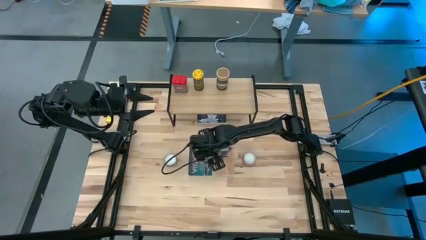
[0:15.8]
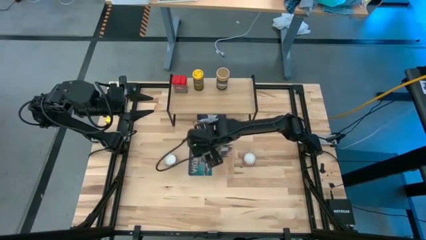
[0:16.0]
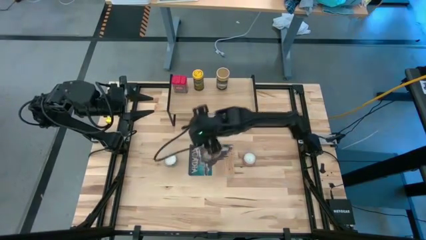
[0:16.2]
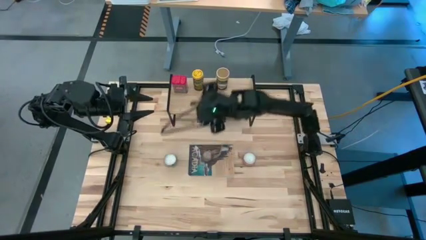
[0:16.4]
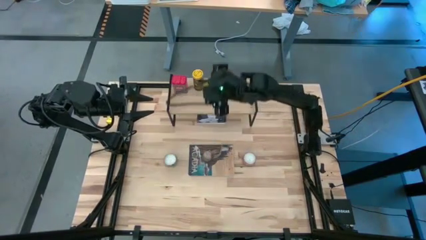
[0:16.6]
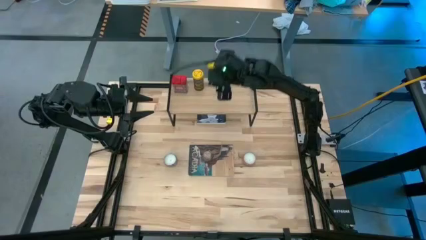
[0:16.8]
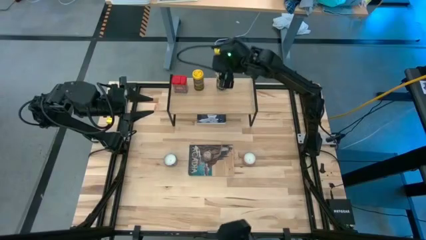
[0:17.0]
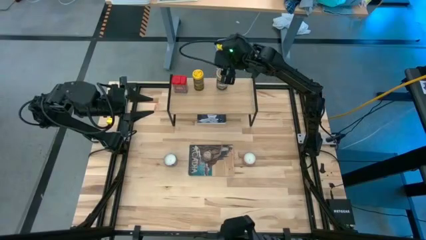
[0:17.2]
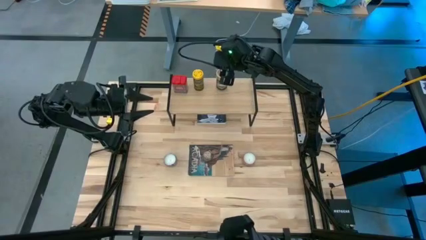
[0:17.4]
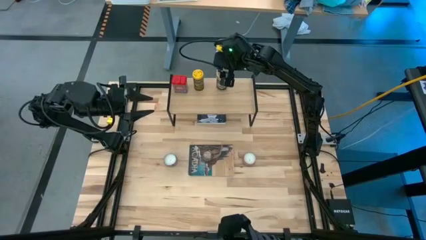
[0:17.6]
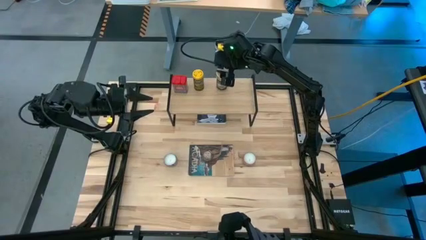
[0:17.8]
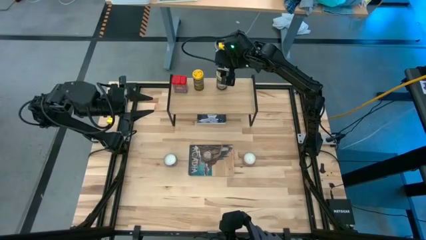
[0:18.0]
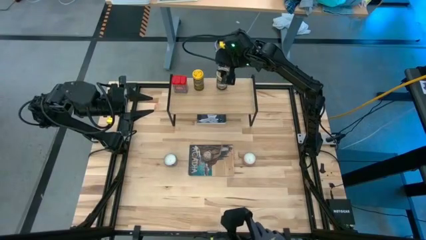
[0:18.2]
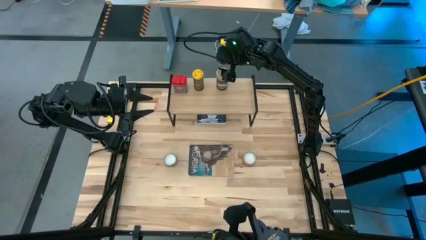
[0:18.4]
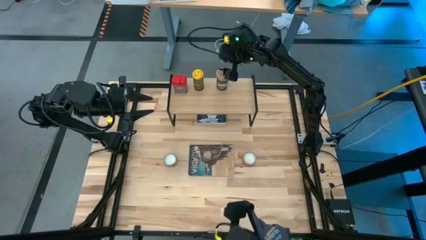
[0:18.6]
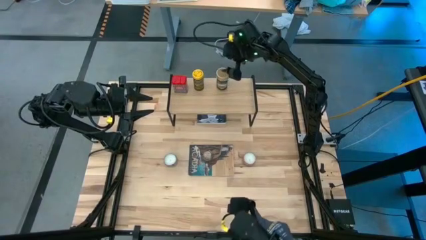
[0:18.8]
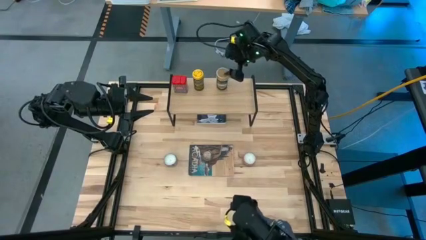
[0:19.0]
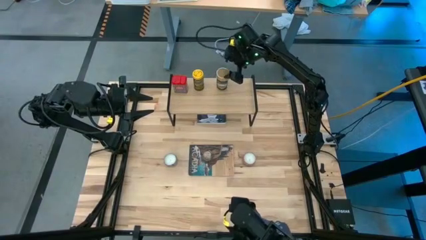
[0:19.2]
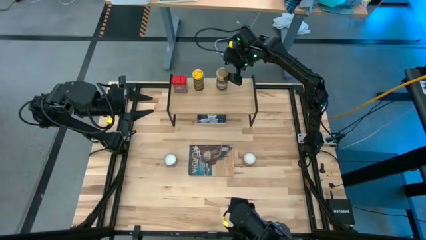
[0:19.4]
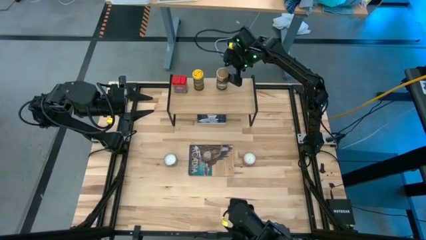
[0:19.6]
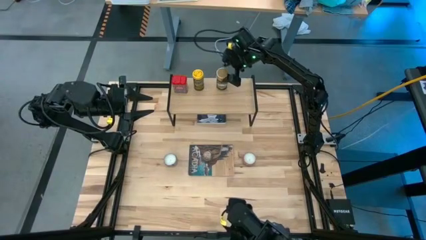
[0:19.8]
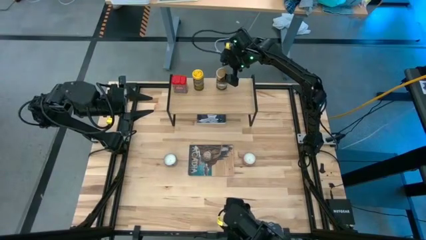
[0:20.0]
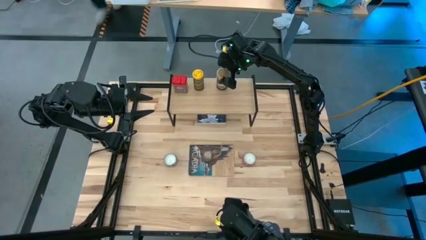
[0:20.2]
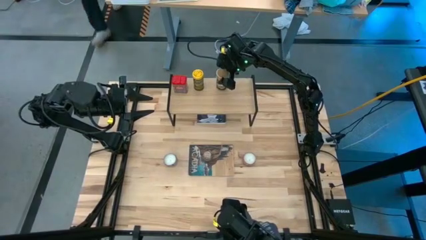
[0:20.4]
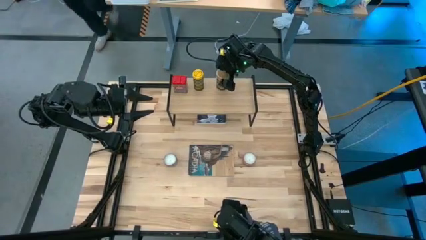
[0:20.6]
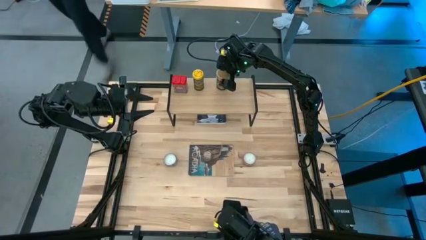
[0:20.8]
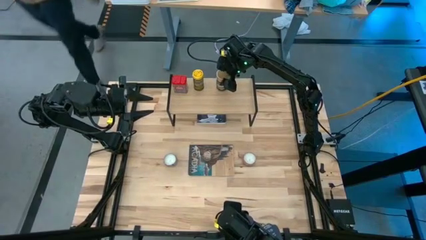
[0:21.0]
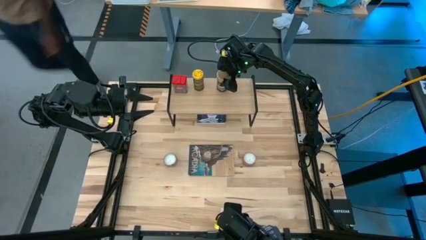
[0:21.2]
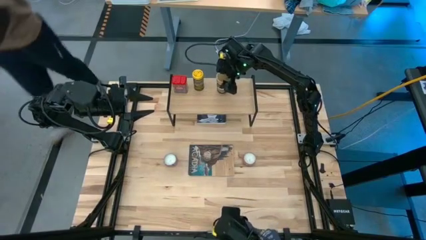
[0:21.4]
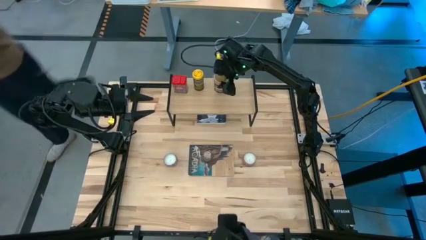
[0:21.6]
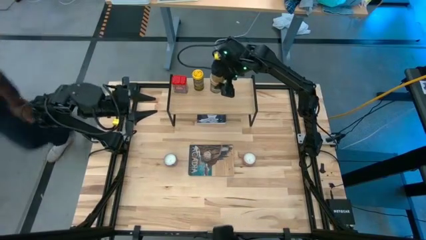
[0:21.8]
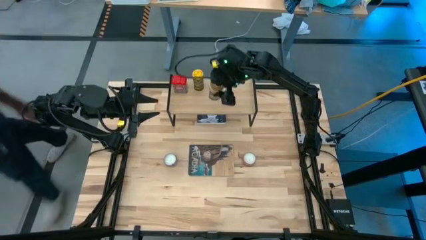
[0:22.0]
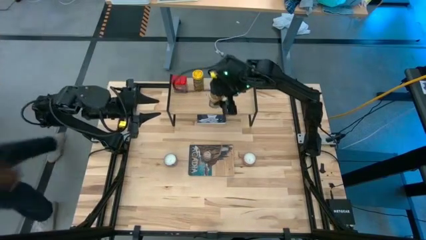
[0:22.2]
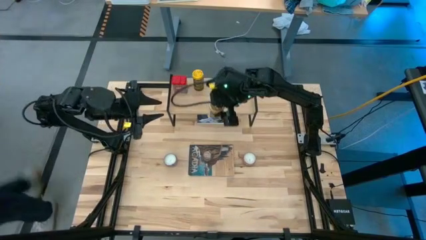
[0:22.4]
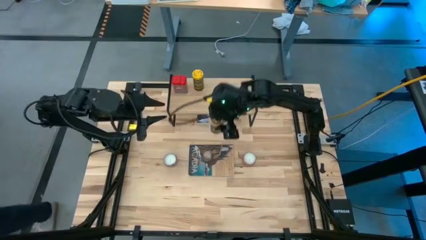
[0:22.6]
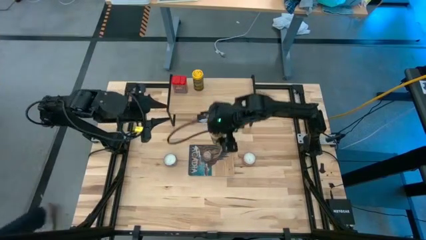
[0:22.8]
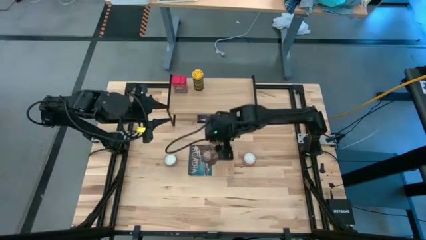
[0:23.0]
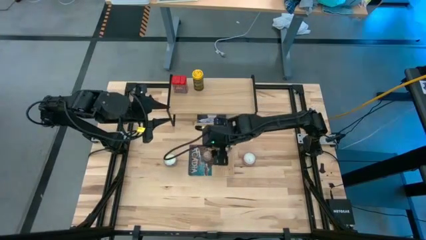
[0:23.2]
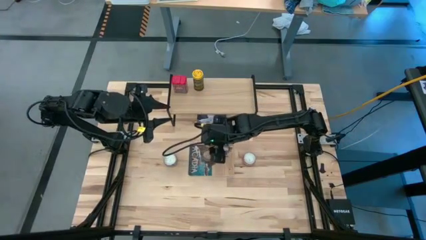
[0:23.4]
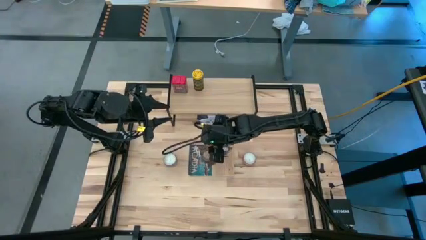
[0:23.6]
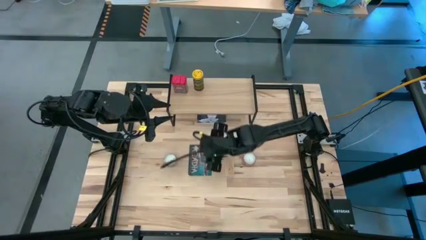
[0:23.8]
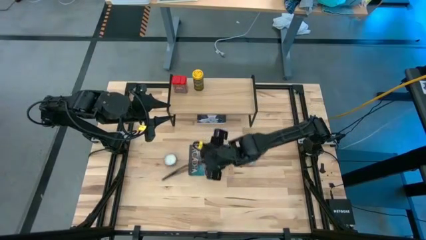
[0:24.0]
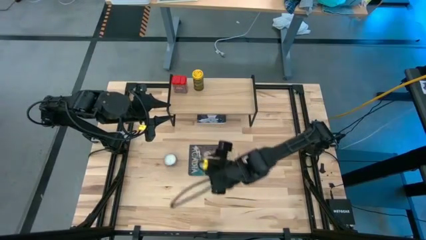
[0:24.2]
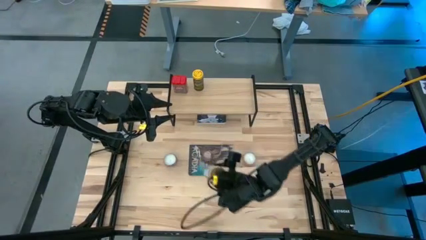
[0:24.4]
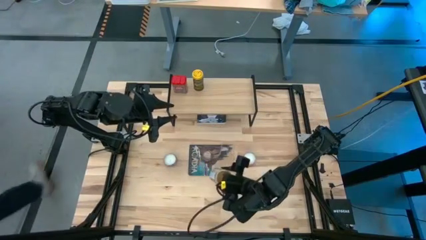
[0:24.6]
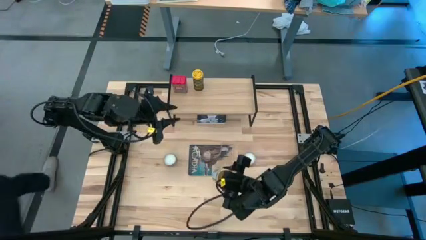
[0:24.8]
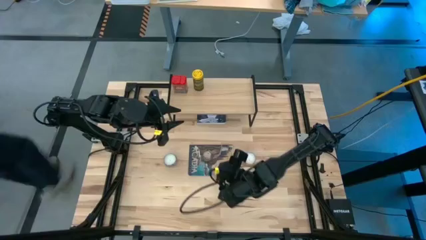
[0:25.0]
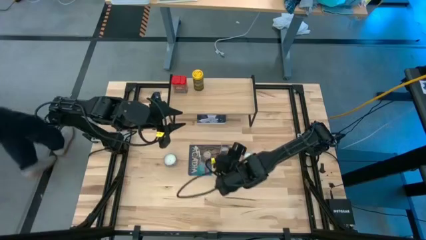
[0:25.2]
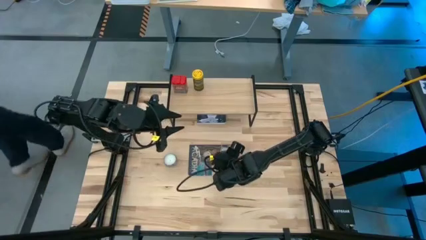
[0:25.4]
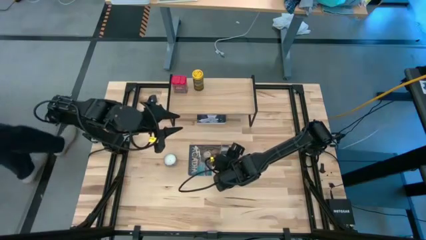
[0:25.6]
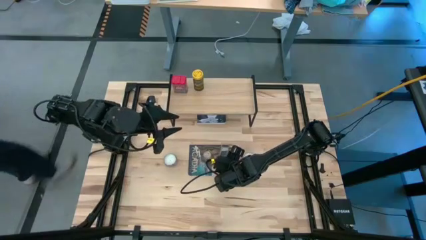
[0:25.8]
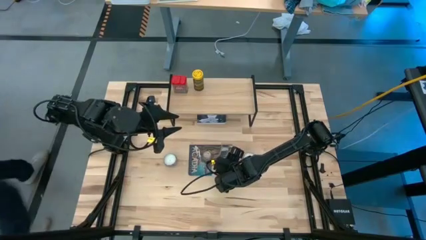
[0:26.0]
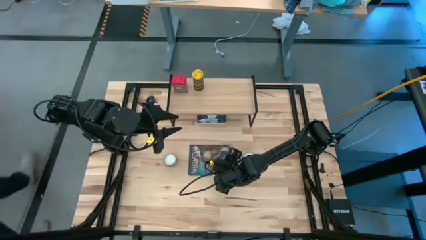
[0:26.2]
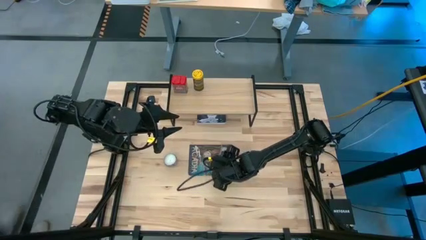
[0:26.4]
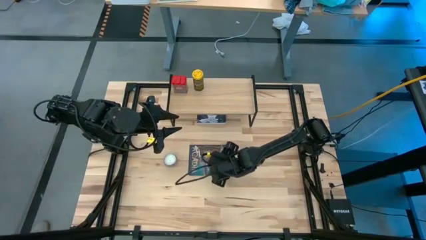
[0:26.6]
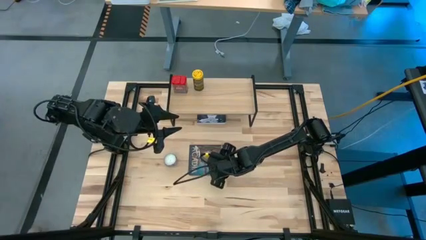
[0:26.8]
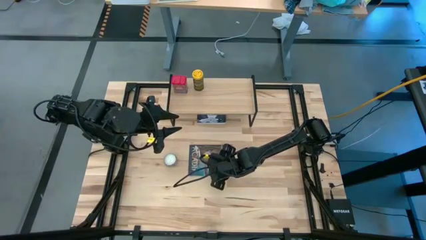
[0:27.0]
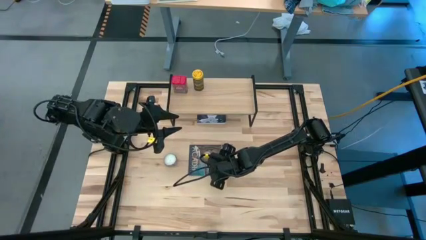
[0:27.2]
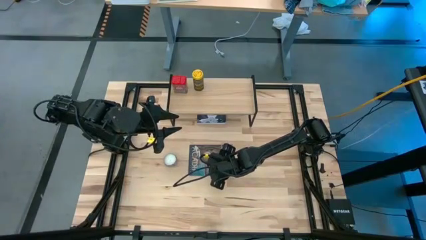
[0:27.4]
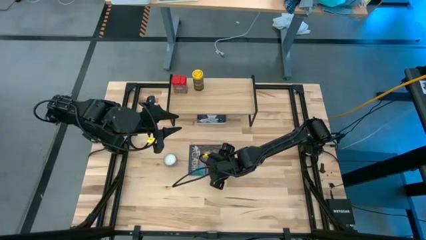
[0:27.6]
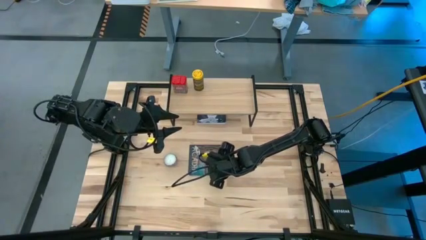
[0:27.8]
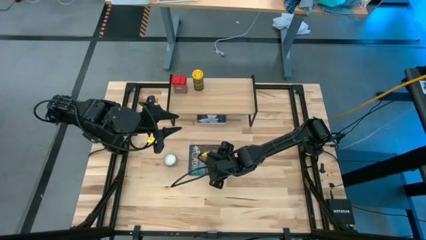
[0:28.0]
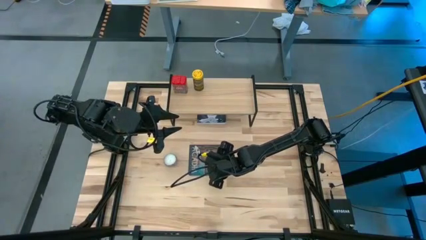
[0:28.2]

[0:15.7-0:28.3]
Task: Shelf spices
Remove the brown seasoning bottle from the shelf
